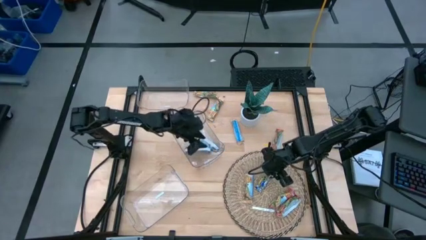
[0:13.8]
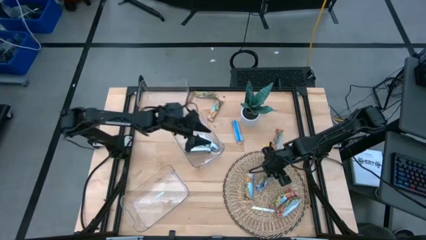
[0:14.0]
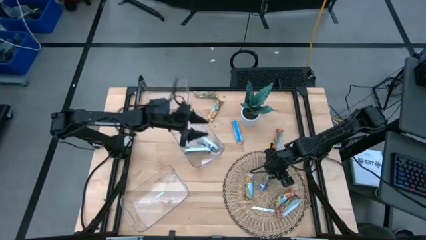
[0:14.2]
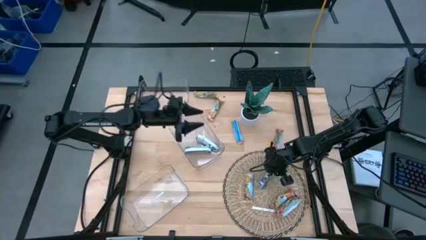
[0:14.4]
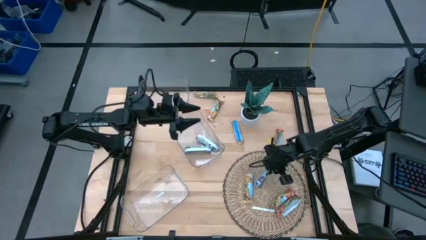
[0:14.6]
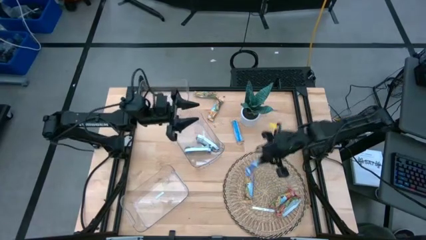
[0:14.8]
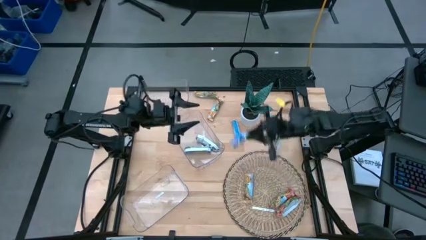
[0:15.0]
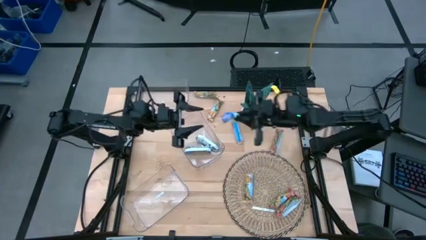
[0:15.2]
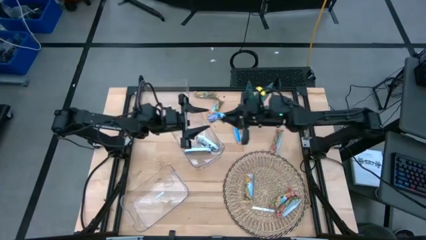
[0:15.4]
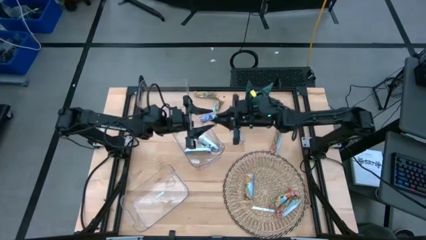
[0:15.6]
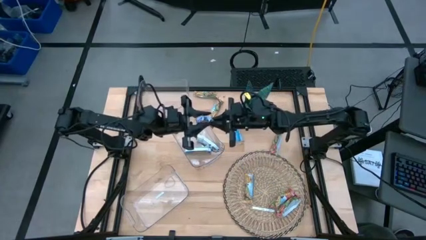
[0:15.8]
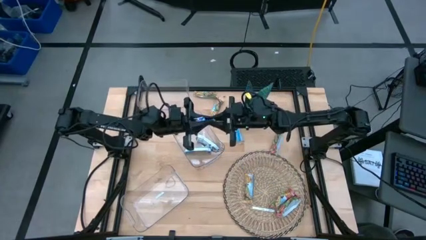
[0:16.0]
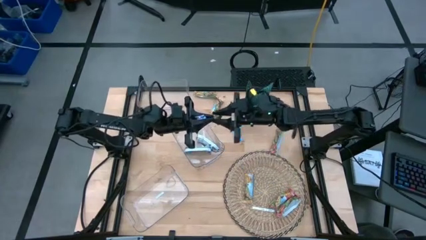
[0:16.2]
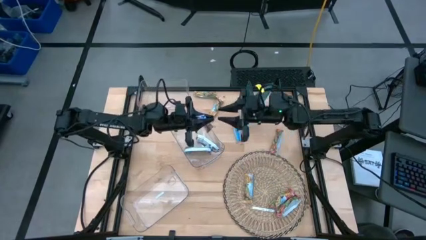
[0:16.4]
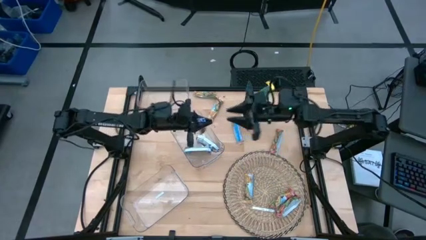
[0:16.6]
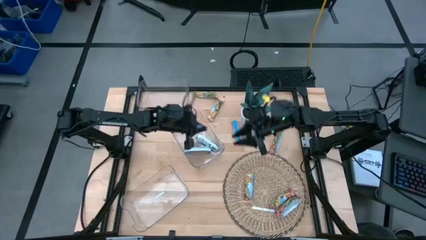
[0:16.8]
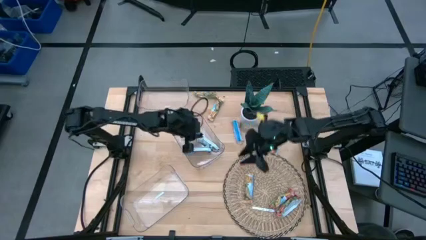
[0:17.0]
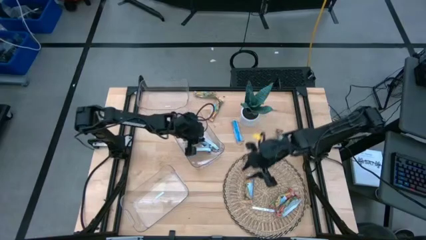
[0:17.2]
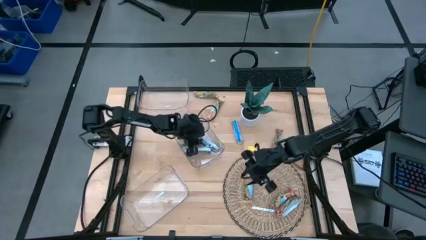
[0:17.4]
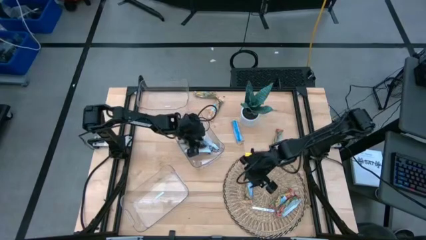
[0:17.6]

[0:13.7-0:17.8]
Task: Pick and place Granola Bars by type
Put the blue granola bar into the middle transparent bin

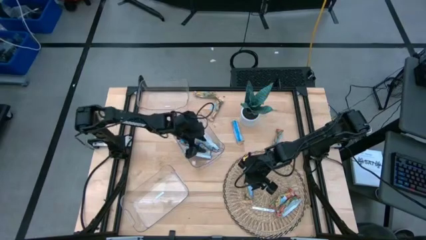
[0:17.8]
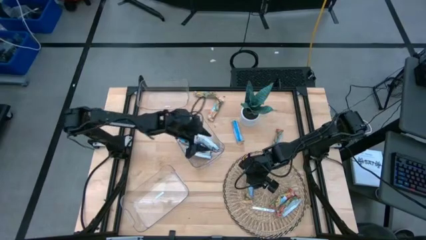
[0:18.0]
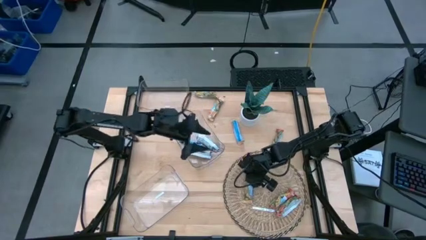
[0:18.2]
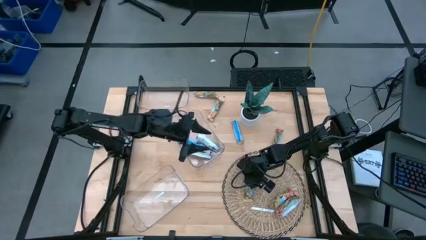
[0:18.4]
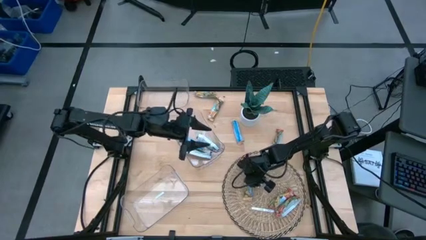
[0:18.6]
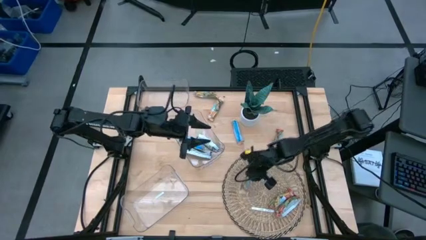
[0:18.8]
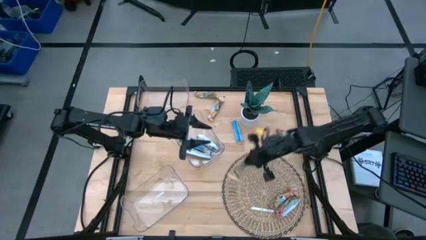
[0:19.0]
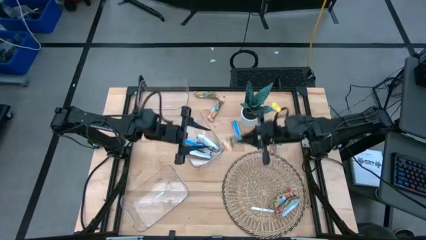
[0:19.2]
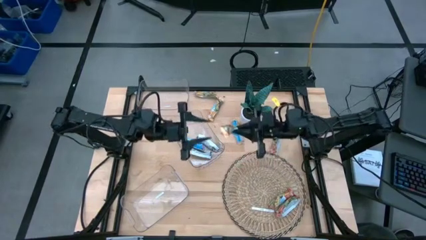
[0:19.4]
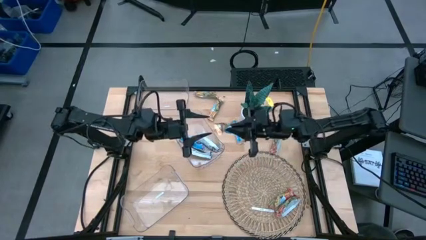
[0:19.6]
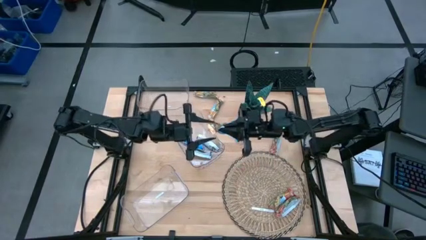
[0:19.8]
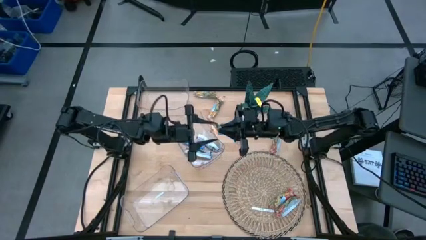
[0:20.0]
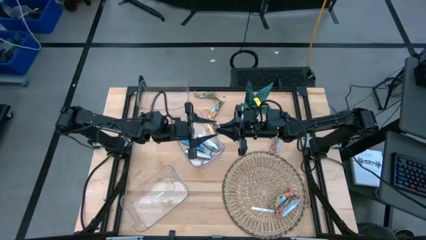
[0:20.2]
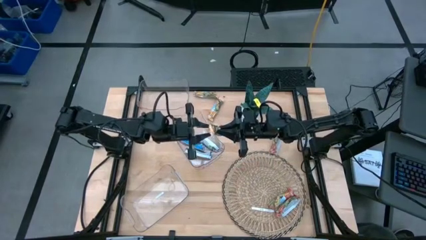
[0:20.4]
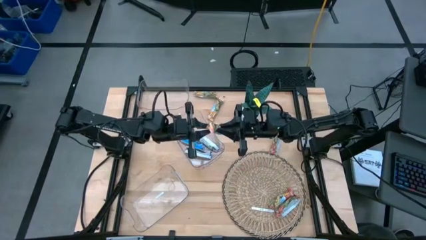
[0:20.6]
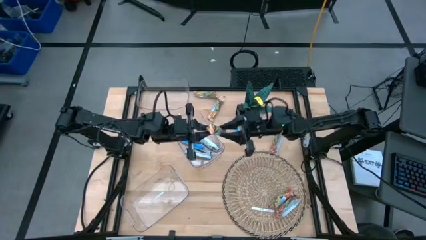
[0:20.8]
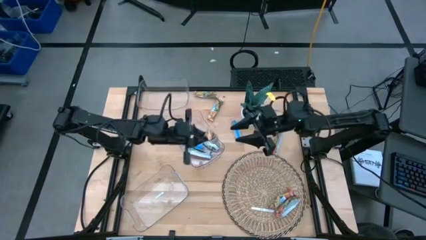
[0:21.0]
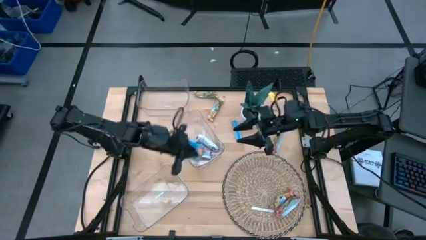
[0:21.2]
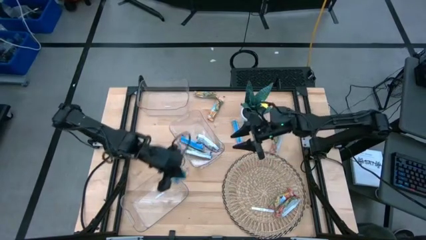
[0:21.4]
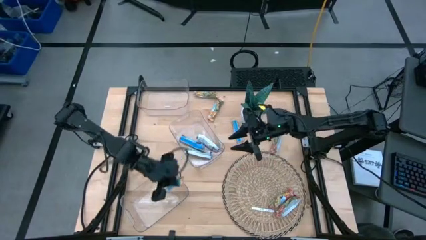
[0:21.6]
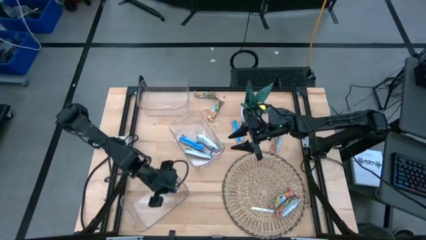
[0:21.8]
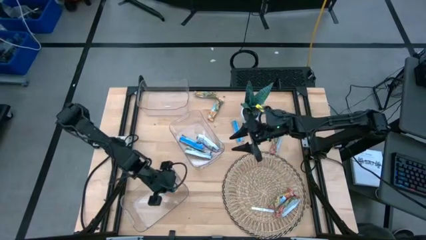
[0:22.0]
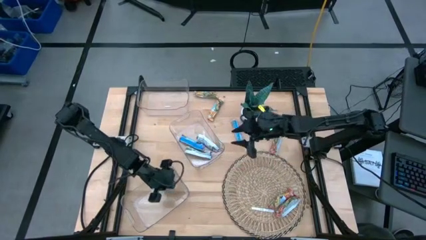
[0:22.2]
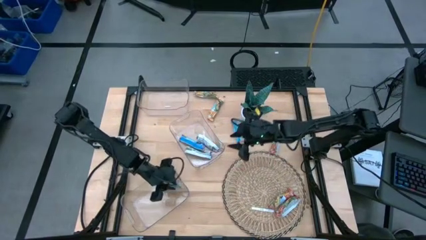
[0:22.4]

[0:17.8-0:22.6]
Put the yellow granola bar into the bottom transparent bin

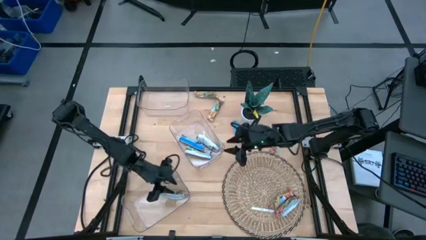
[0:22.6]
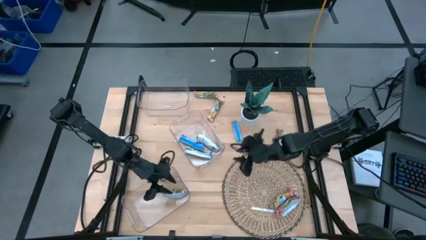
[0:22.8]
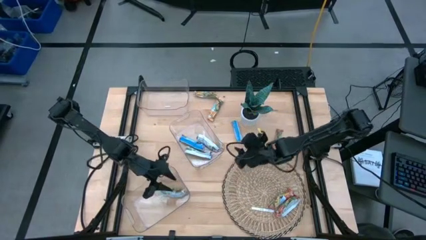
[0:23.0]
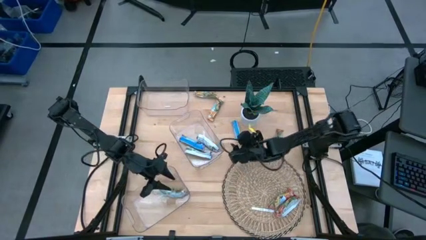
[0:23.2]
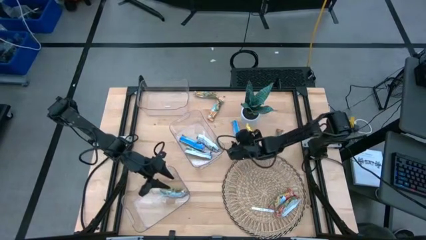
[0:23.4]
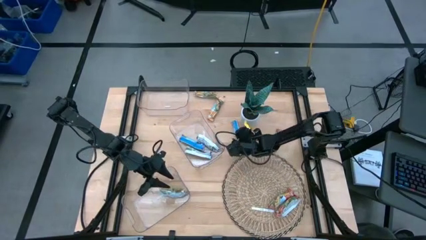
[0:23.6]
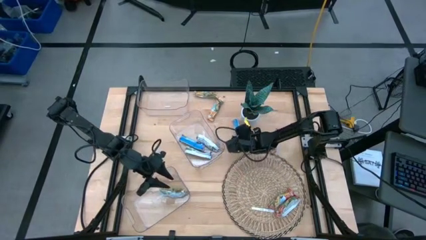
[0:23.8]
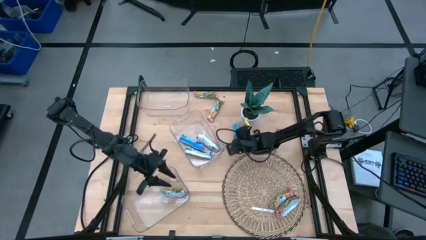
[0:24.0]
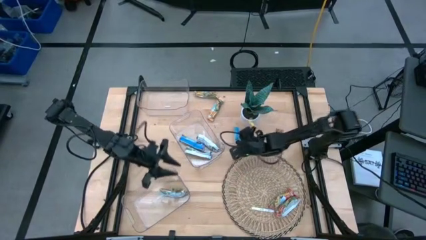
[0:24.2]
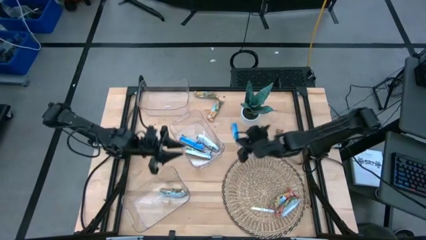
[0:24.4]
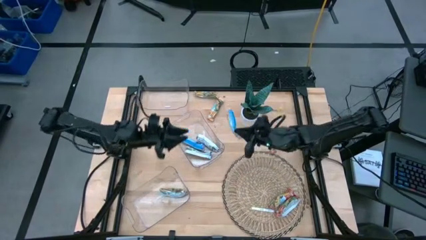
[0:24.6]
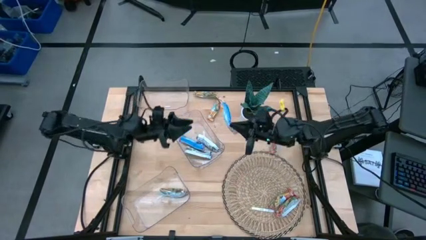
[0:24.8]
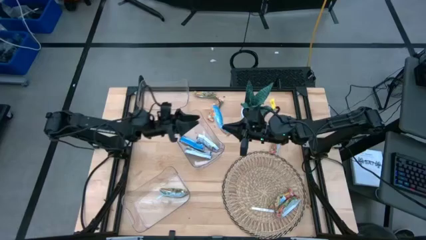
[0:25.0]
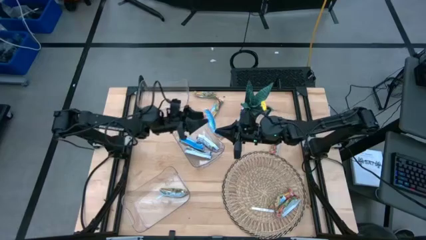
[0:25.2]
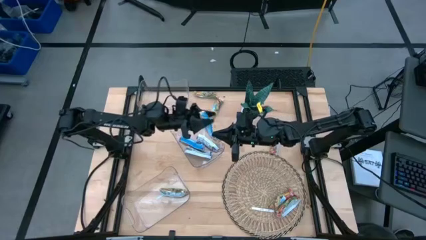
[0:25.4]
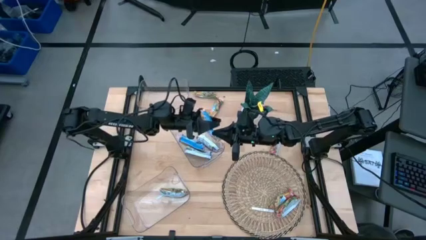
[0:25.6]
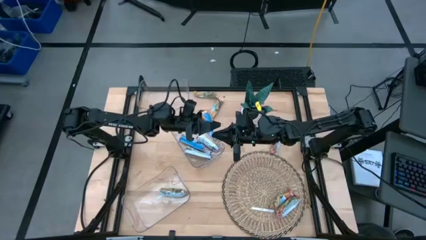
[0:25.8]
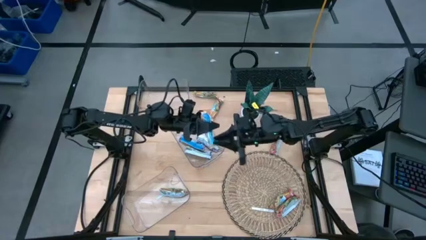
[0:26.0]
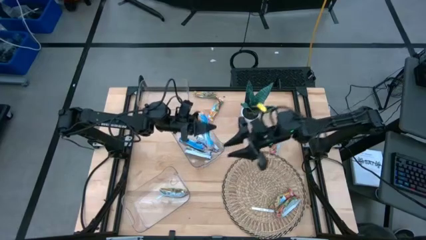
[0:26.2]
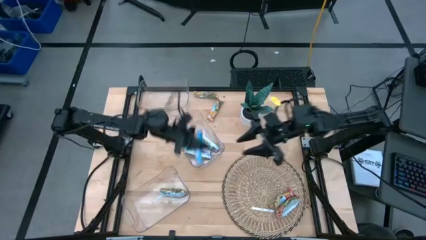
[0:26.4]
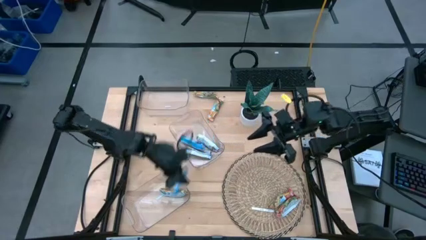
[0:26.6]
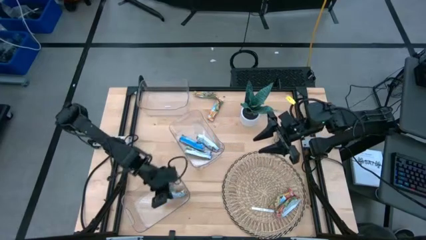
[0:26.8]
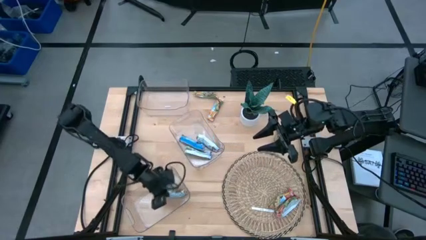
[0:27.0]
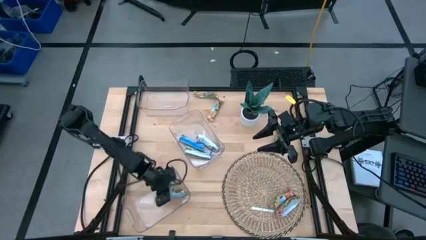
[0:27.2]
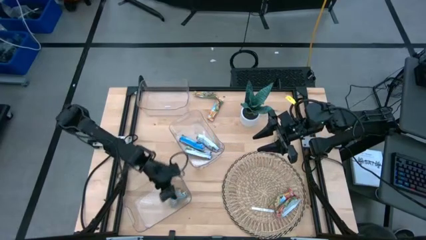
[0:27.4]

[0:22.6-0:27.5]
Put the yellow granola bar into the bottom transparent bin

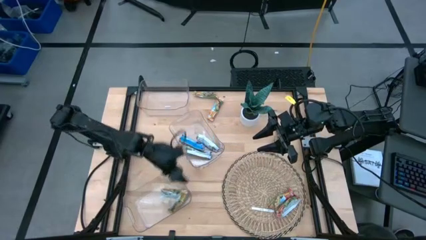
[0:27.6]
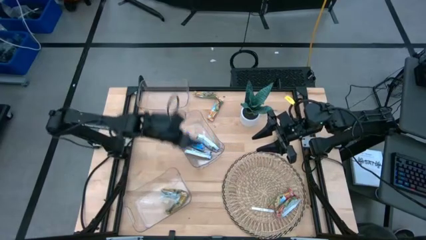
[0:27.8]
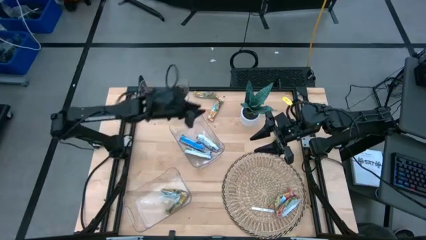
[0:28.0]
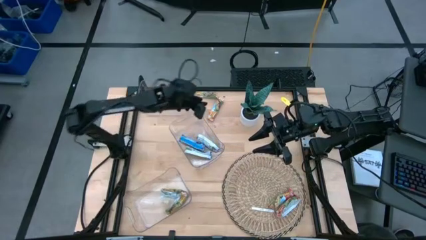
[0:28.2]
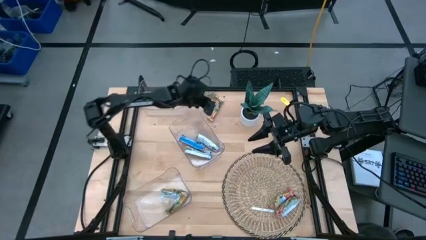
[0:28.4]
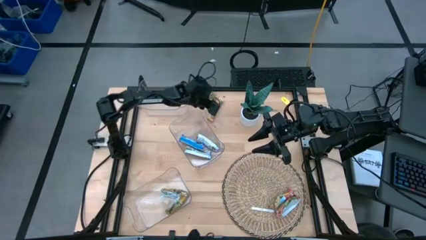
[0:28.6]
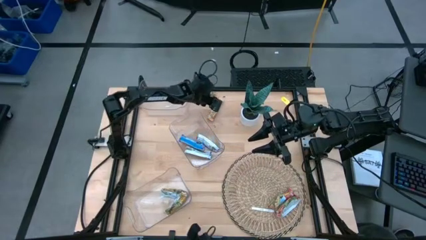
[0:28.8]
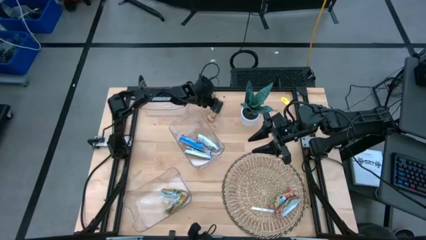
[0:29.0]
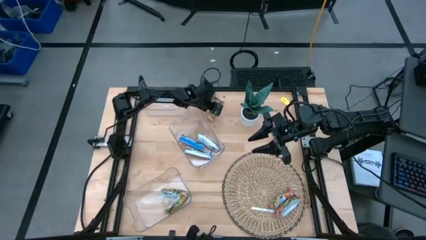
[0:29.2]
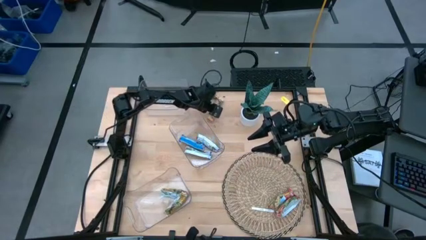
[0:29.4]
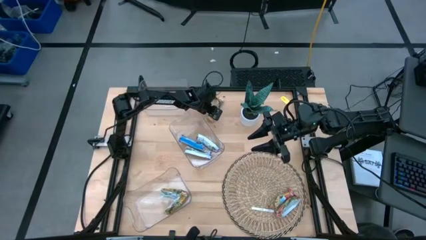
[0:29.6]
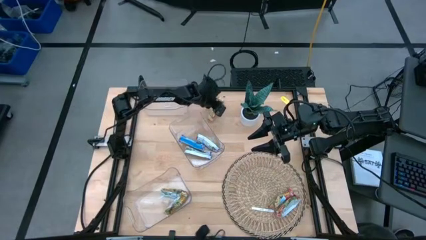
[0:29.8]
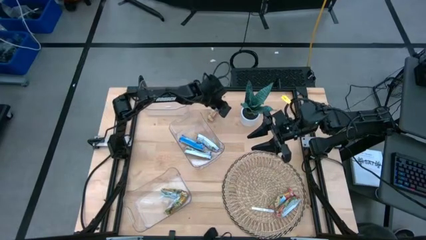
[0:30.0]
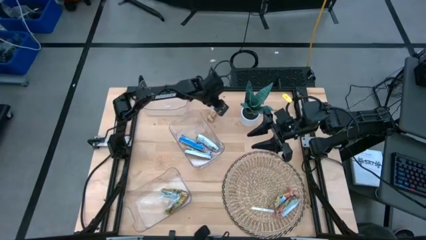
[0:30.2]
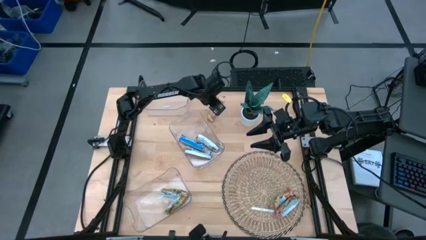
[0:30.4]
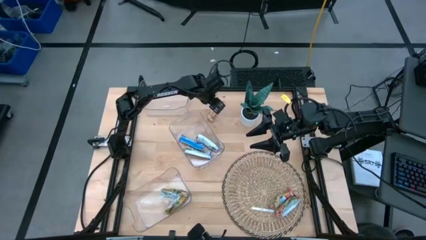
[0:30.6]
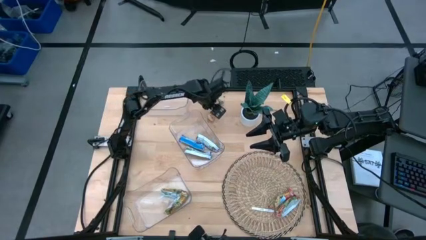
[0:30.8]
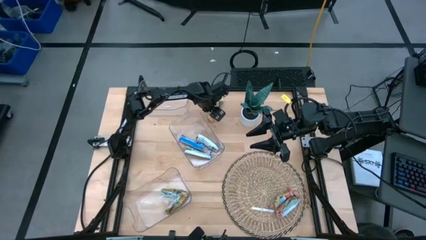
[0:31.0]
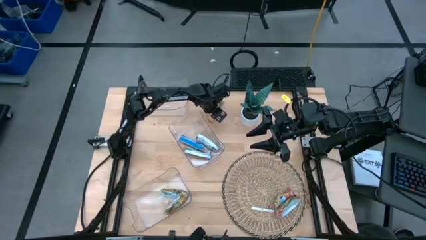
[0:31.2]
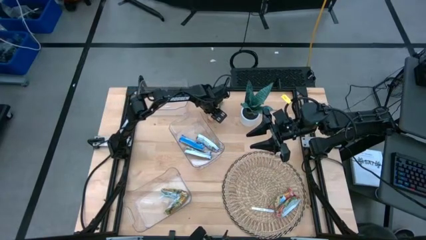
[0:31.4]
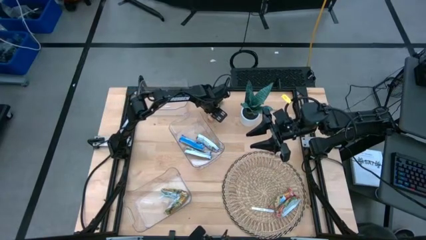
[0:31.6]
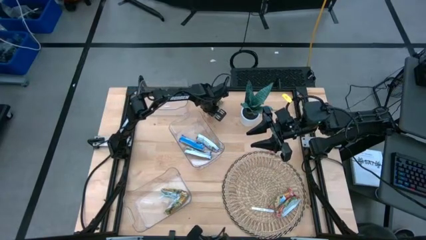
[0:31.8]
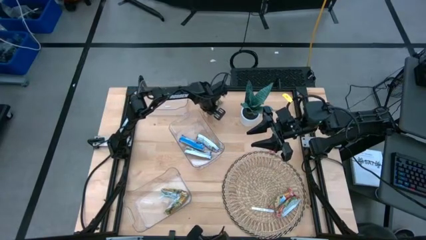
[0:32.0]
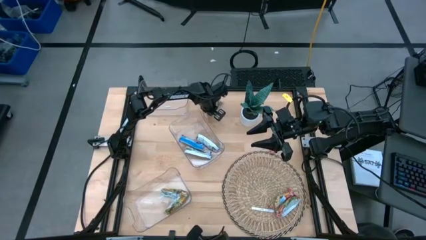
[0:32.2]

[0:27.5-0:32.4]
Put the yellow granola bar into the bottom transparent bin
